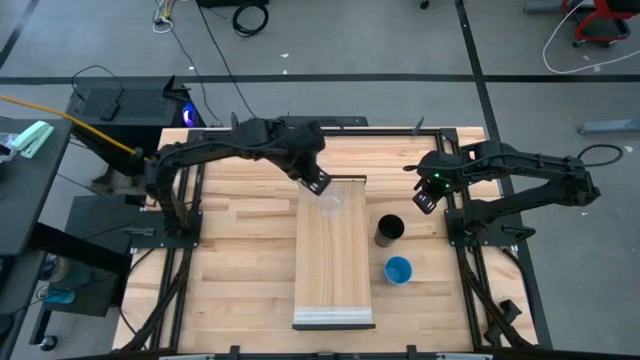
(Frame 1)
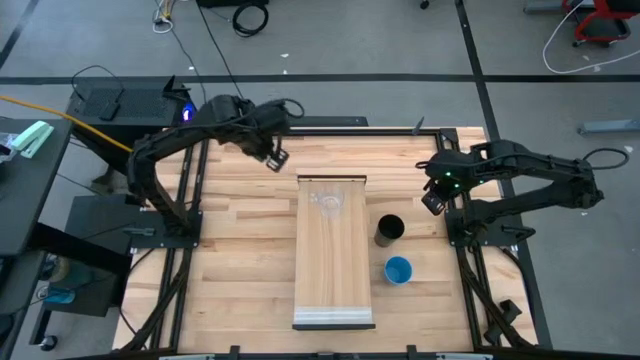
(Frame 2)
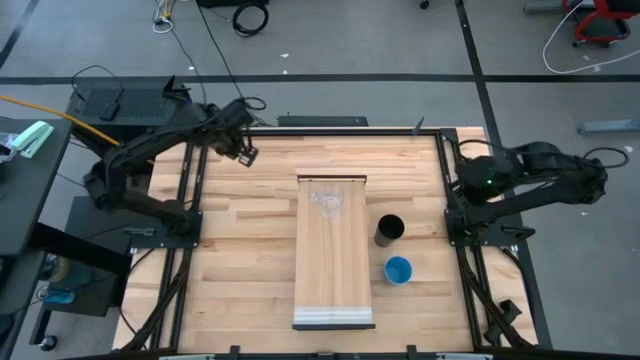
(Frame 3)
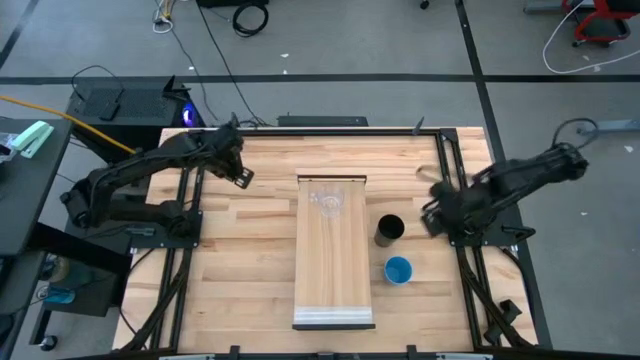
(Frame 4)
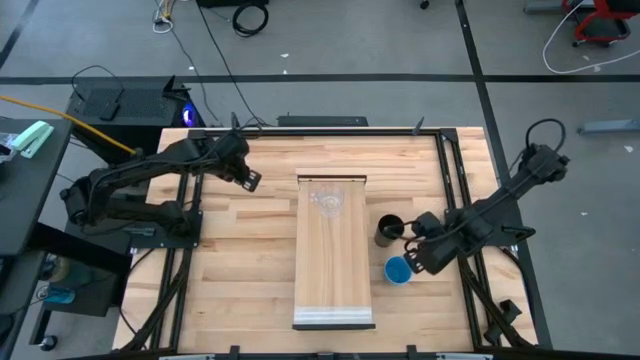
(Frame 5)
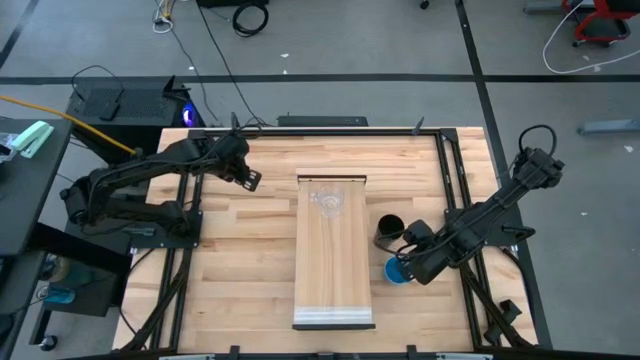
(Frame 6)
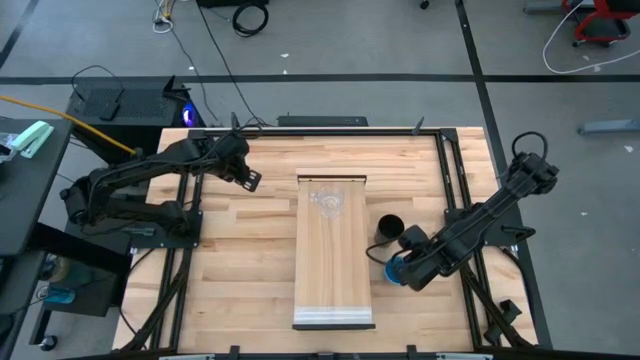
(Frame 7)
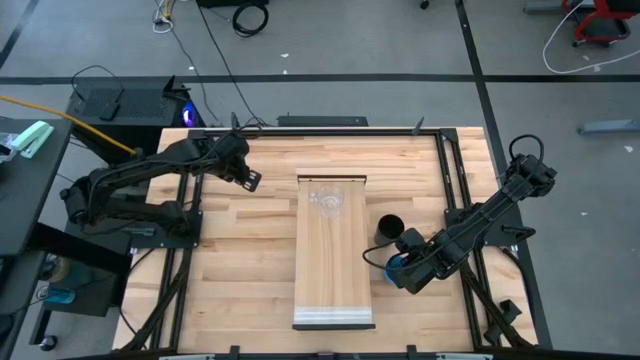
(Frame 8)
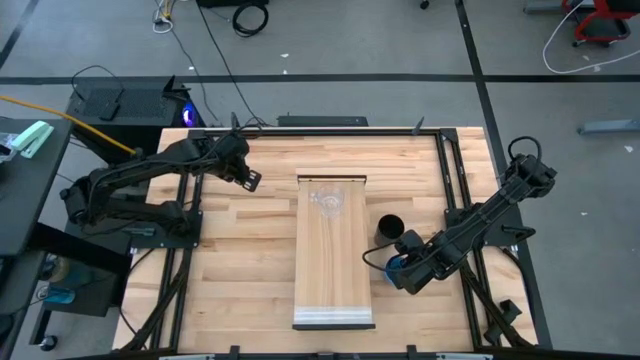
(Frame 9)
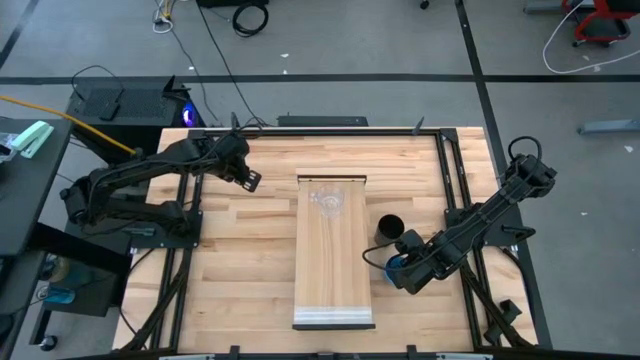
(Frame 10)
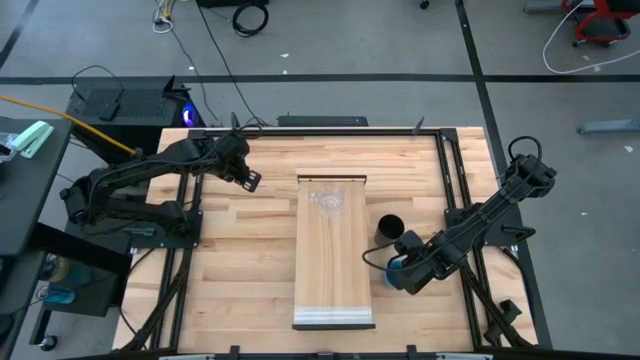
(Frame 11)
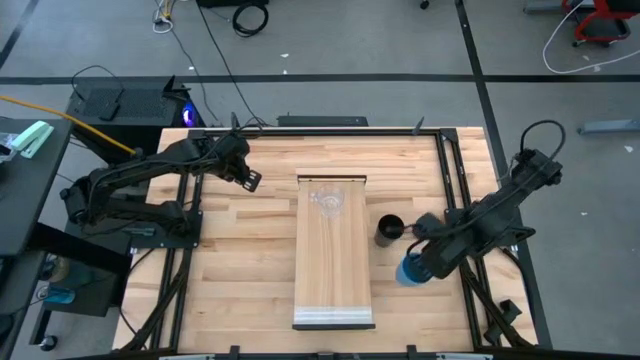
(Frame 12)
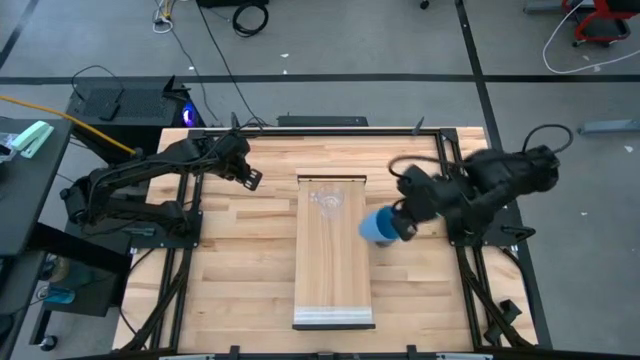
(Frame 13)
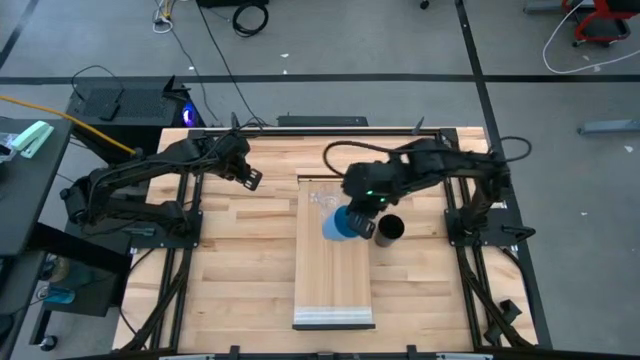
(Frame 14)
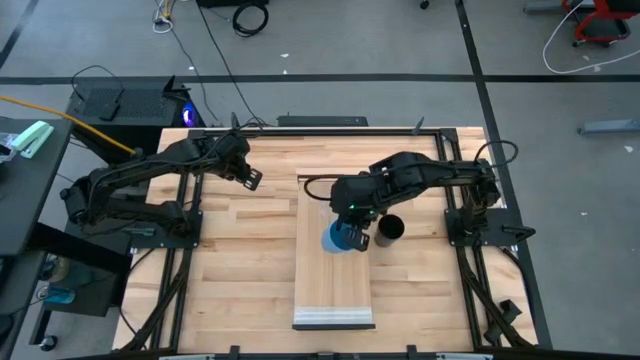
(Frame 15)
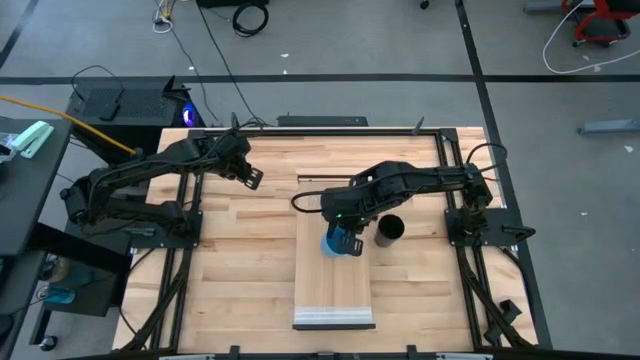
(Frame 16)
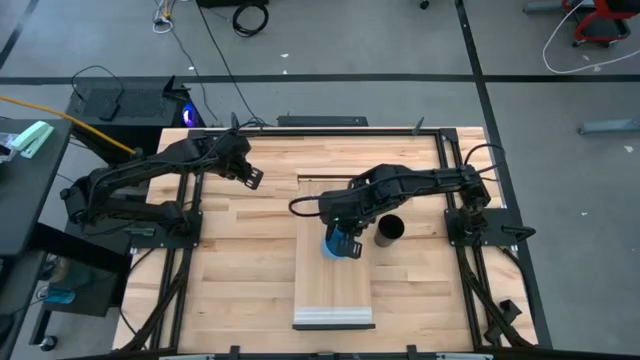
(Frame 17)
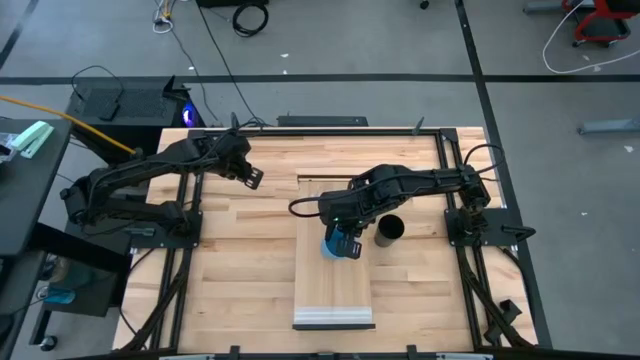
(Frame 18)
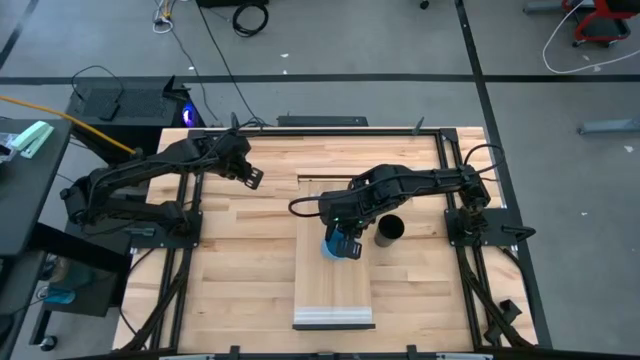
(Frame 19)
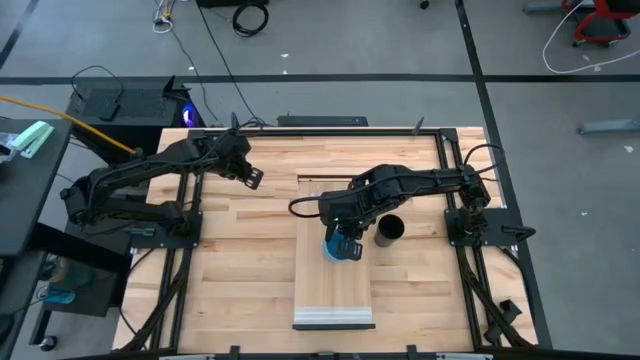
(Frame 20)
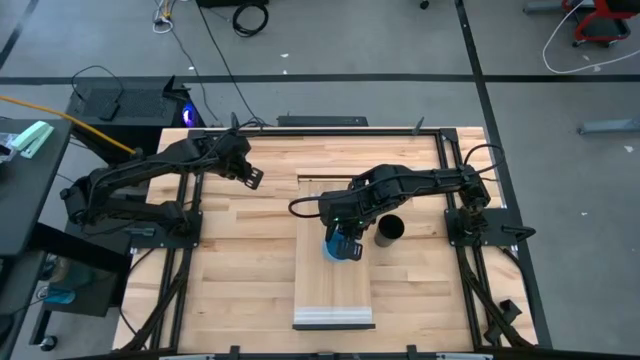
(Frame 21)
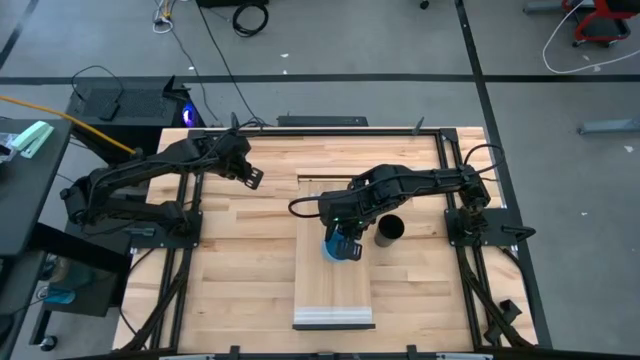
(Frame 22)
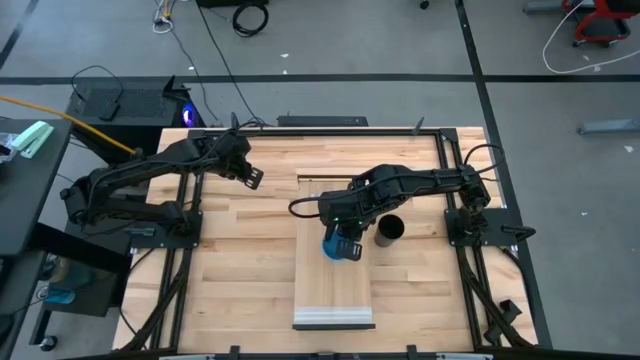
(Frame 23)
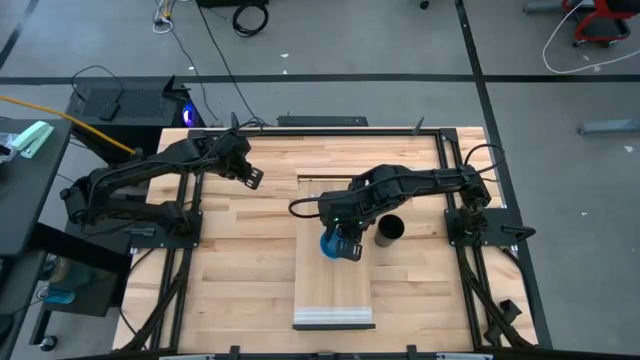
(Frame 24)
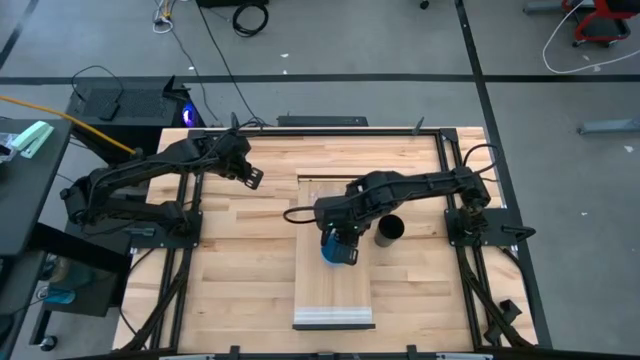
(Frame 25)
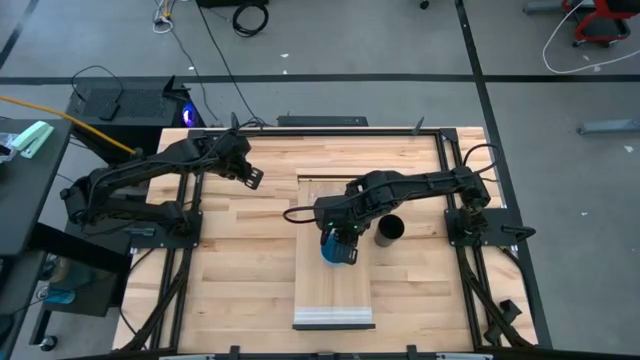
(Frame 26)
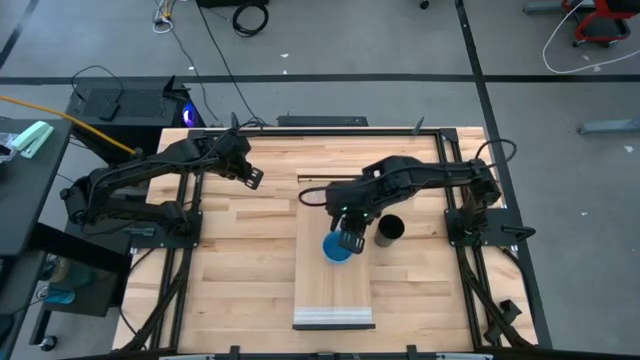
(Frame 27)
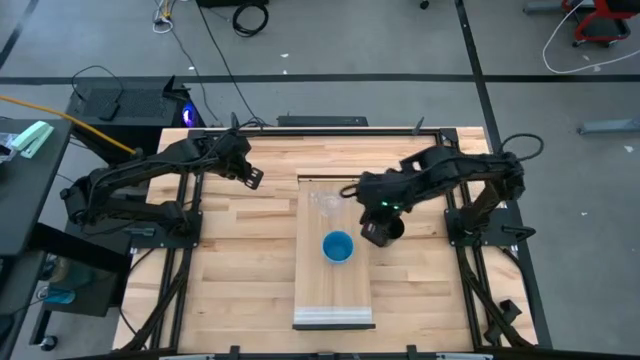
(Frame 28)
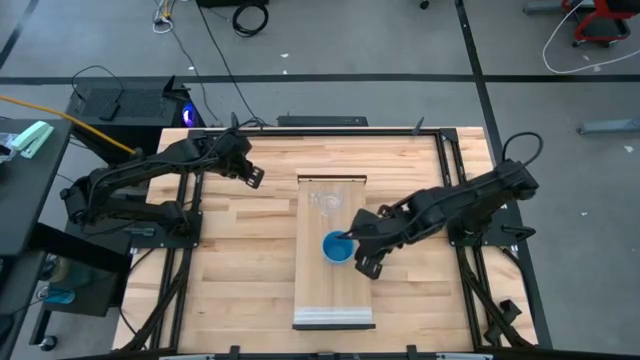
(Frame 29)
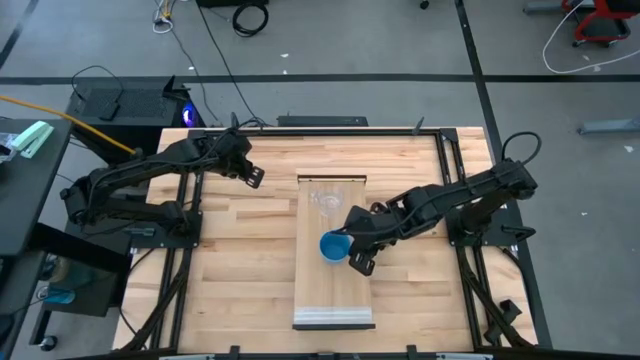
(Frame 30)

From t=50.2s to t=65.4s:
Task: Stack small to large cups/mugs on shelf
Put the blue cup on the shelf

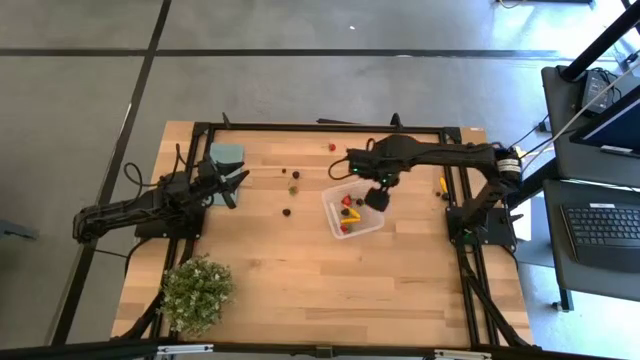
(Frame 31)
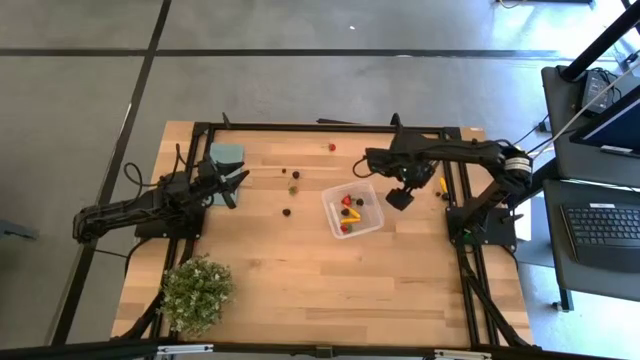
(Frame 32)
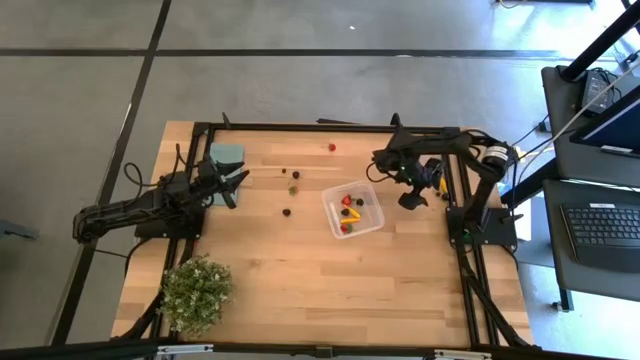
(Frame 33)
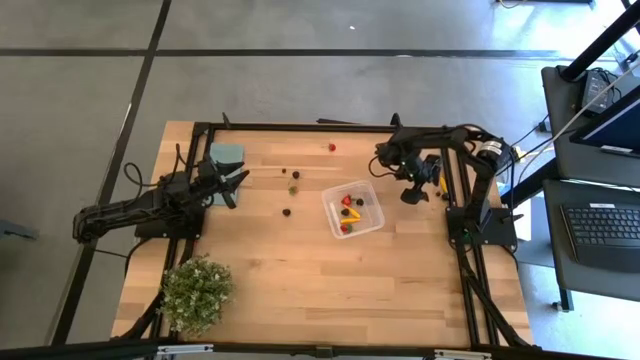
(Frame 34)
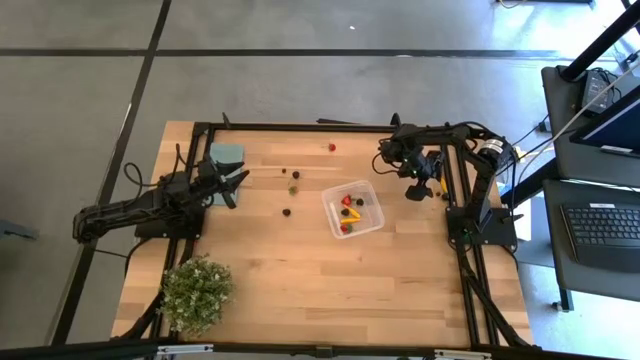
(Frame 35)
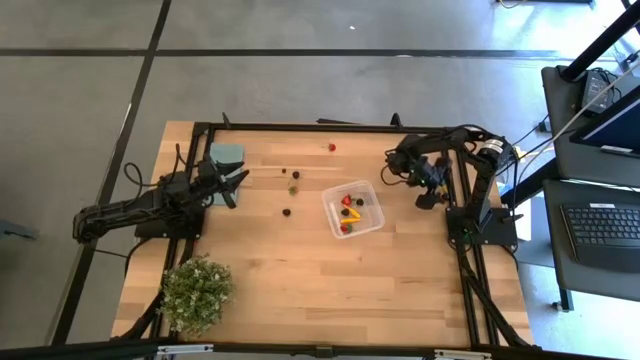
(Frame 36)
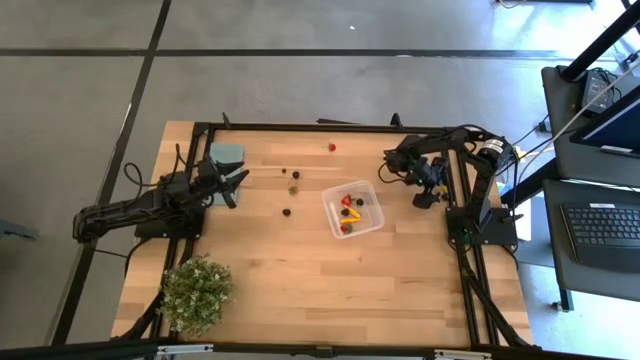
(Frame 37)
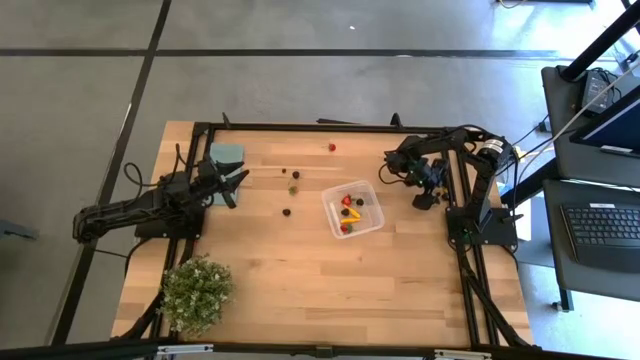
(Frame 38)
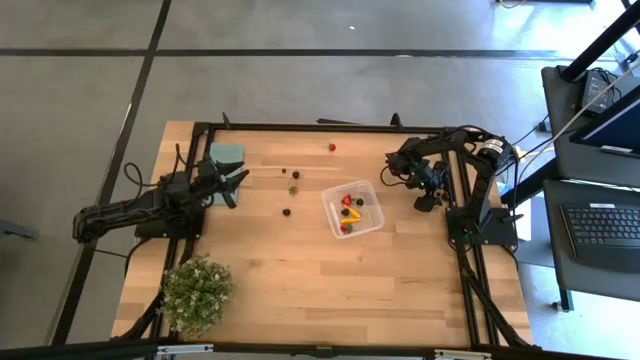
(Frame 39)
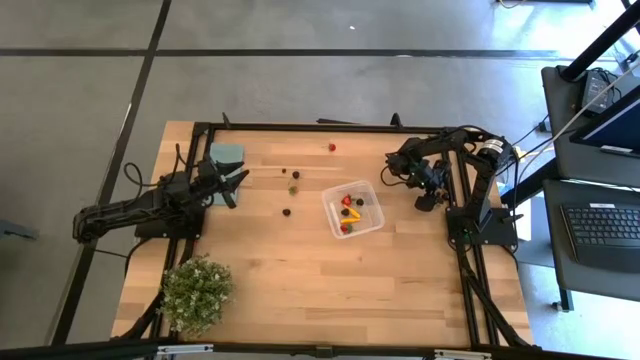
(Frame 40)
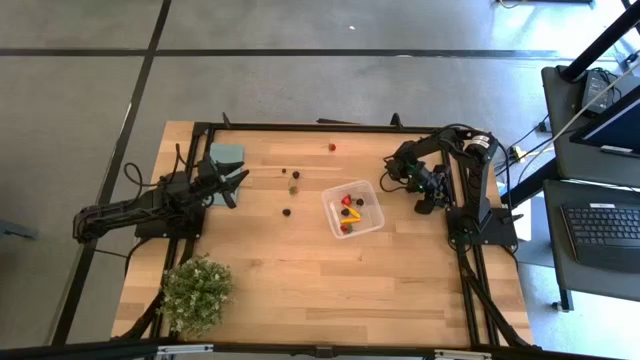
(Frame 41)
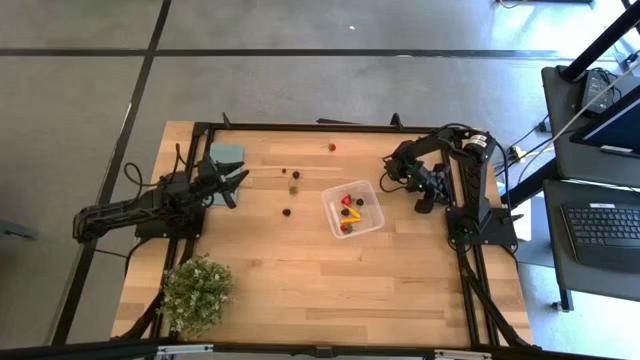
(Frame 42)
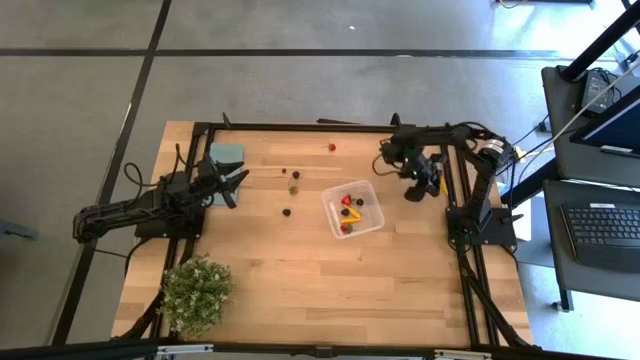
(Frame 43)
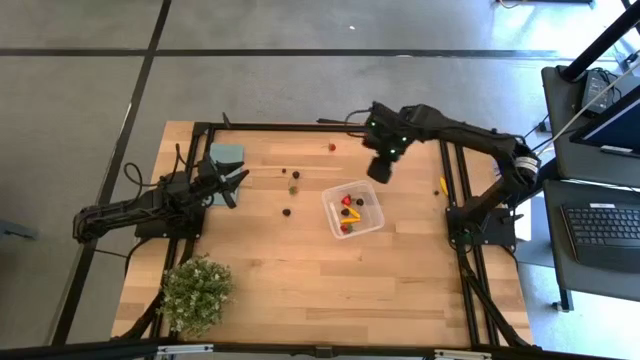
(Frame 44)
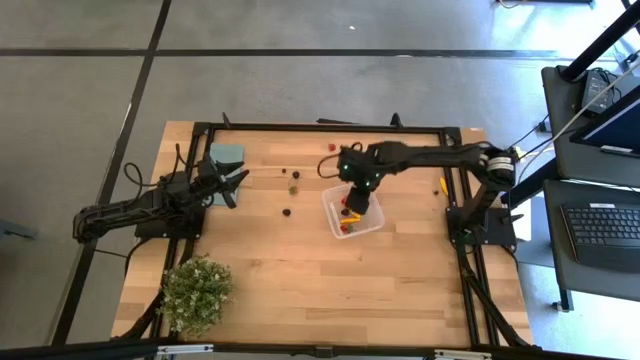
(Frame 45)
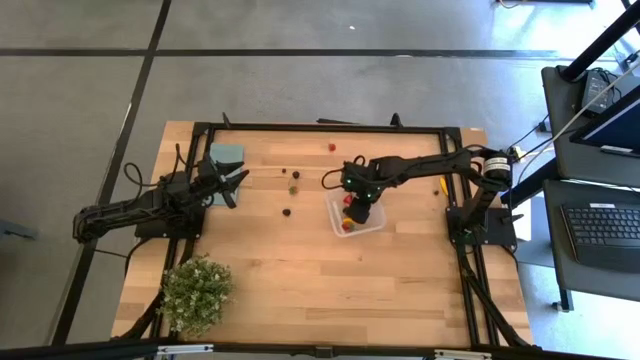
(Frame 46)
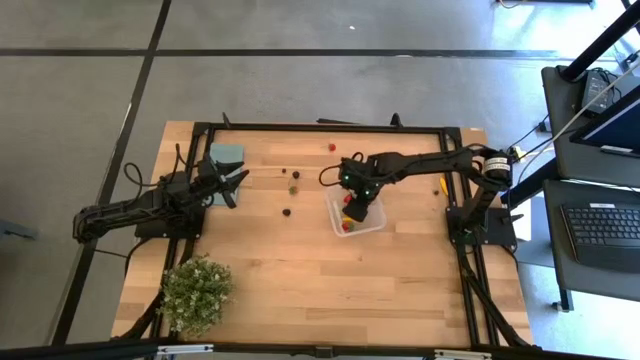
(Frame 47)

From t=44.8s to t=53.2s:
Task: Pick and placing Produce into tupperware
Put the middle right cherry into the transparent bin
